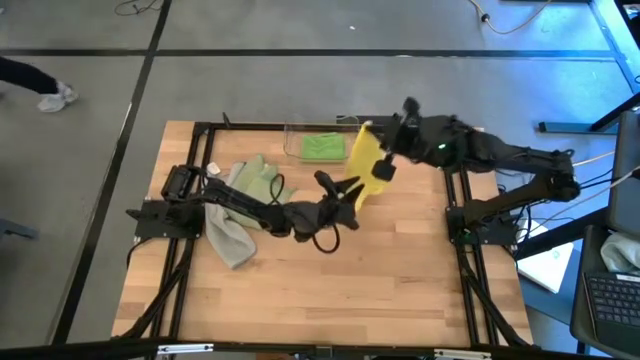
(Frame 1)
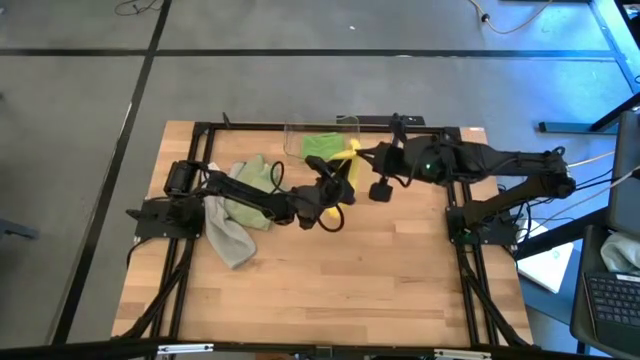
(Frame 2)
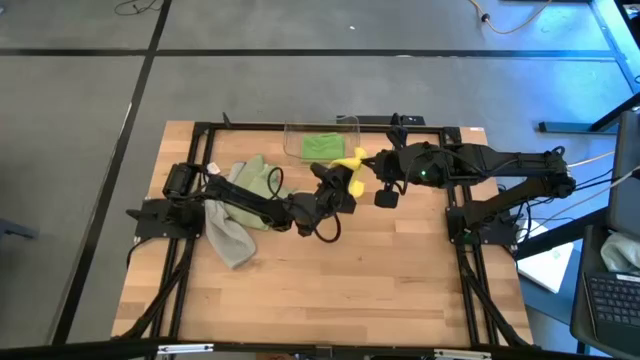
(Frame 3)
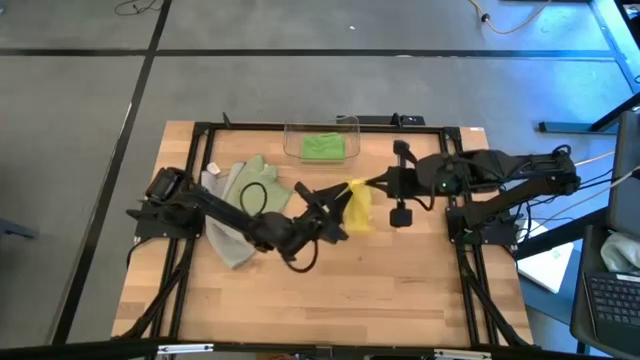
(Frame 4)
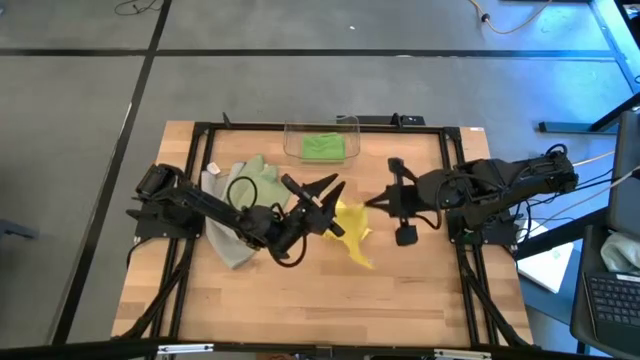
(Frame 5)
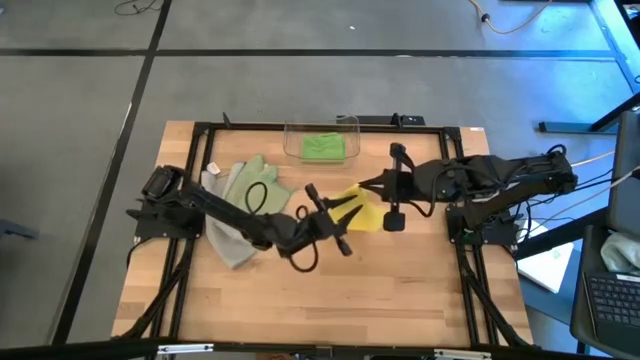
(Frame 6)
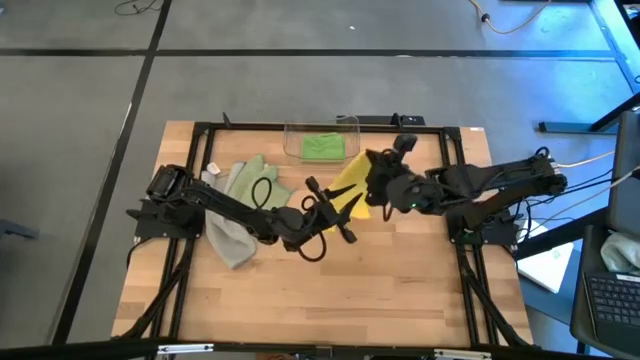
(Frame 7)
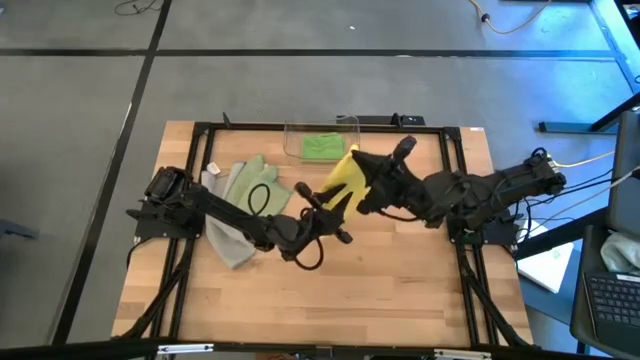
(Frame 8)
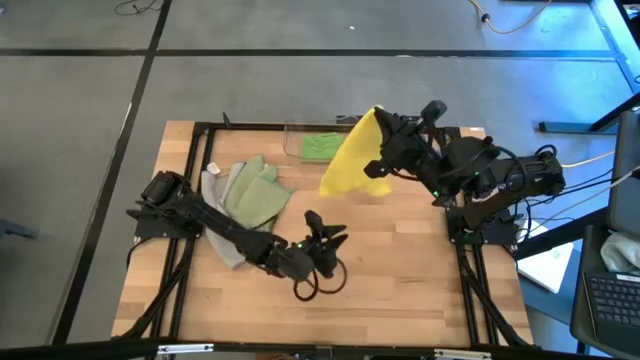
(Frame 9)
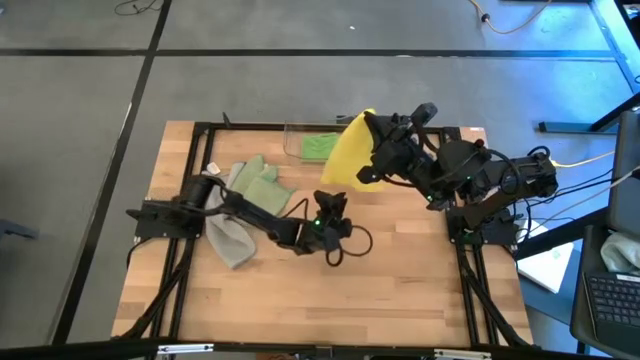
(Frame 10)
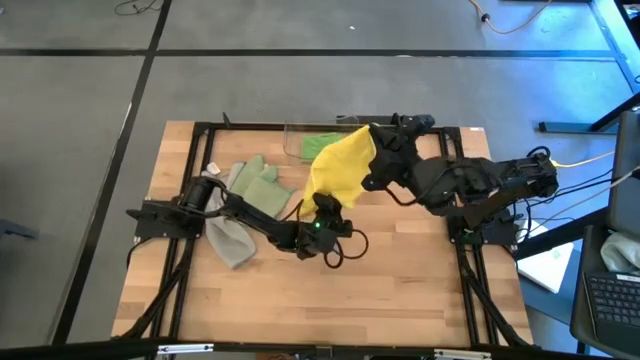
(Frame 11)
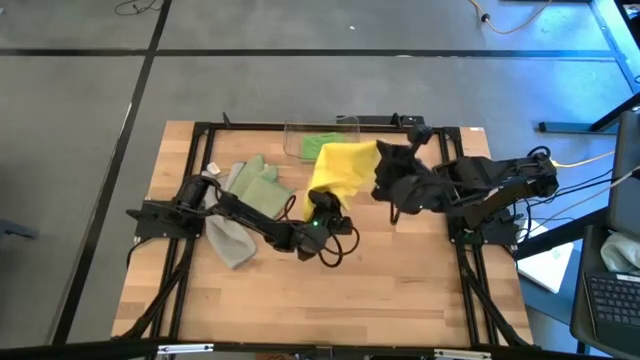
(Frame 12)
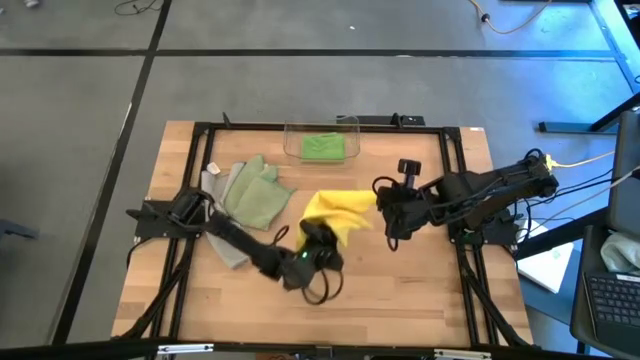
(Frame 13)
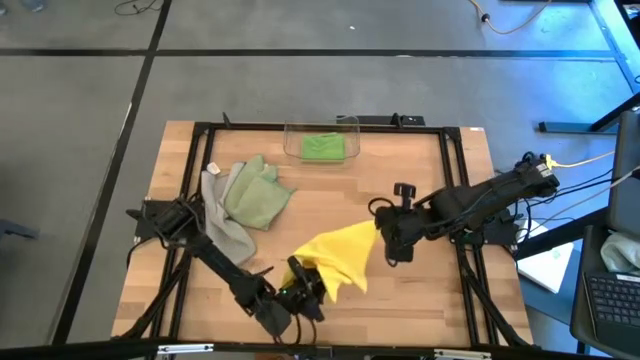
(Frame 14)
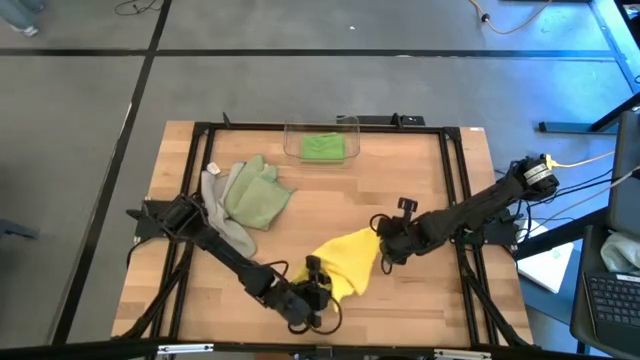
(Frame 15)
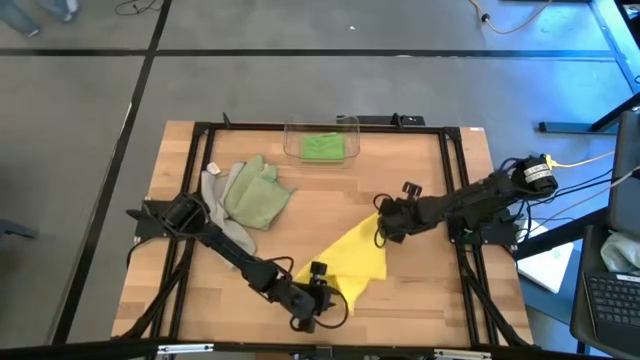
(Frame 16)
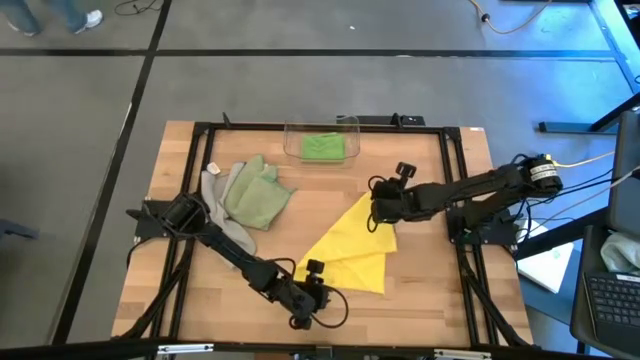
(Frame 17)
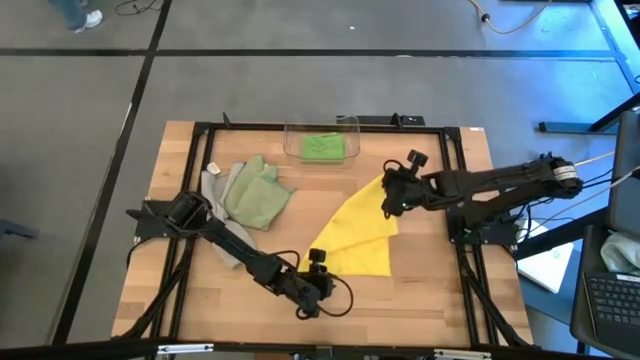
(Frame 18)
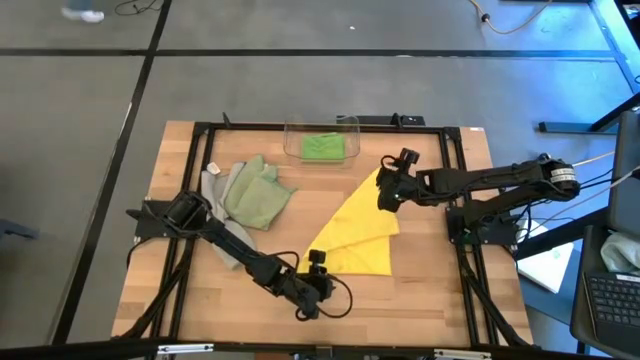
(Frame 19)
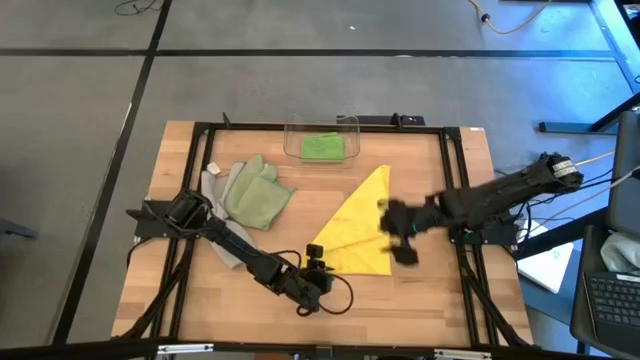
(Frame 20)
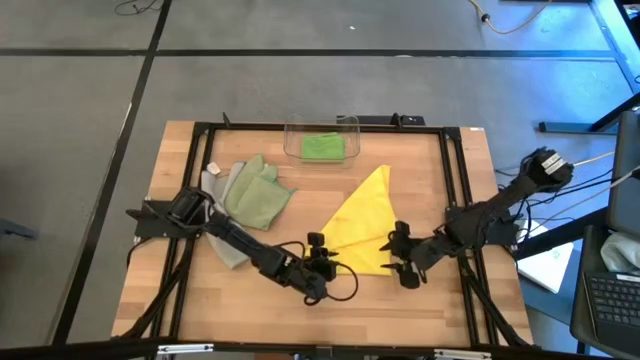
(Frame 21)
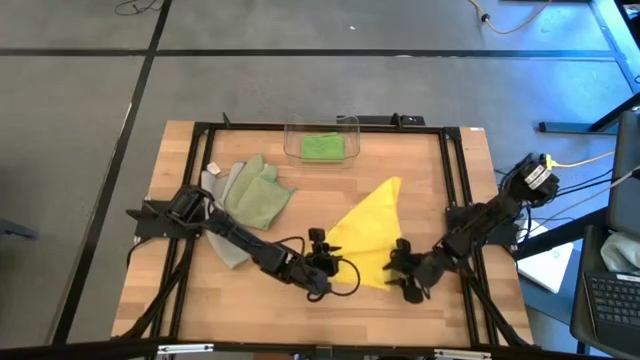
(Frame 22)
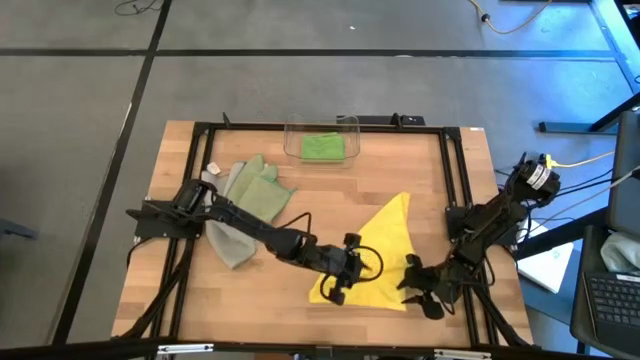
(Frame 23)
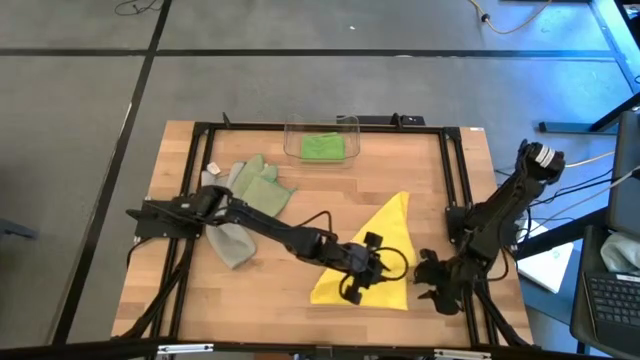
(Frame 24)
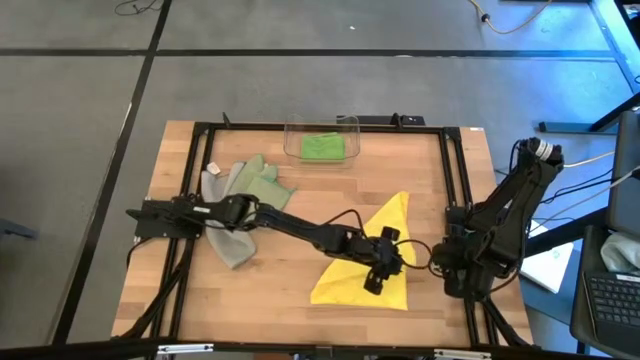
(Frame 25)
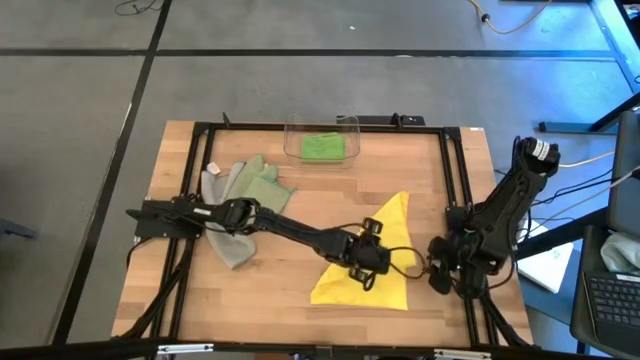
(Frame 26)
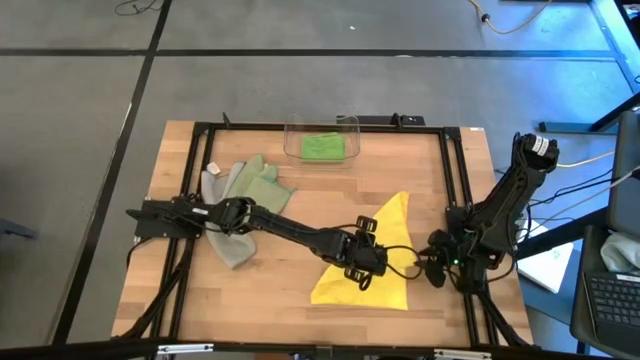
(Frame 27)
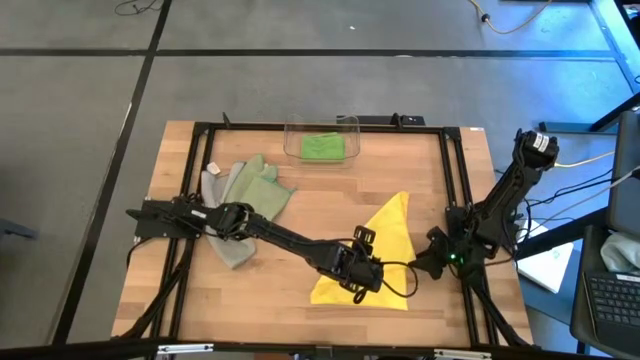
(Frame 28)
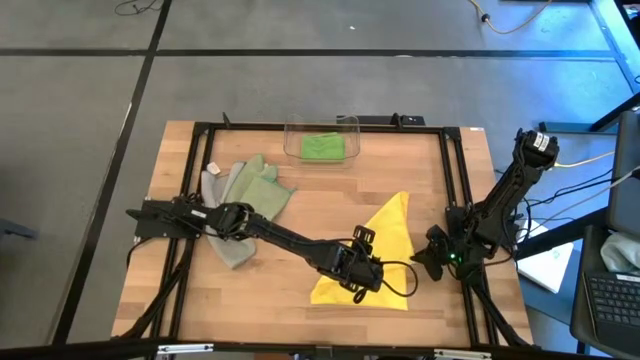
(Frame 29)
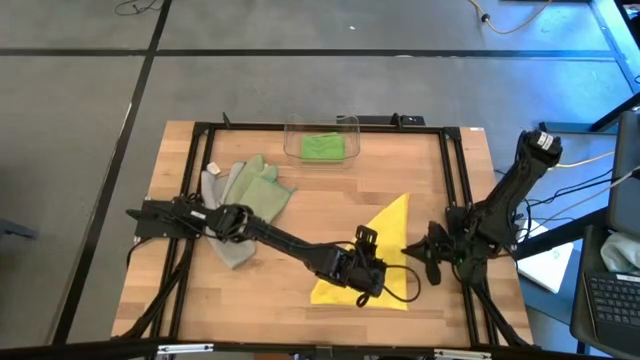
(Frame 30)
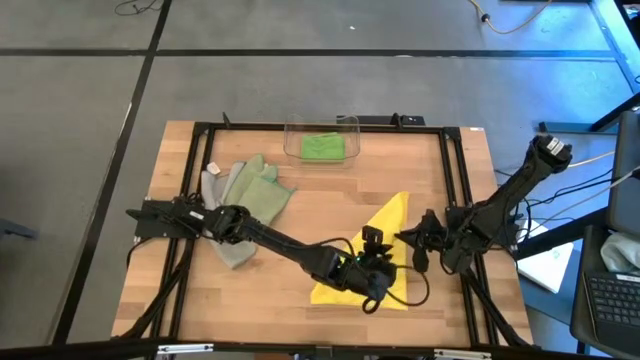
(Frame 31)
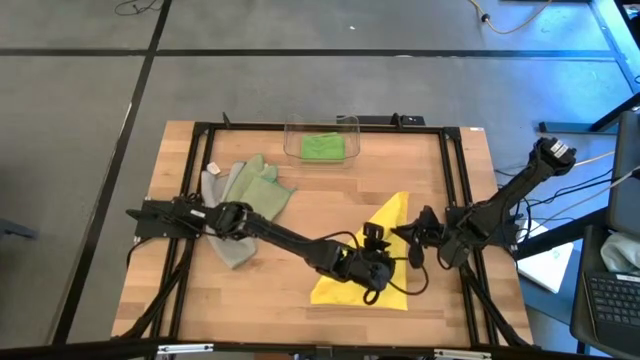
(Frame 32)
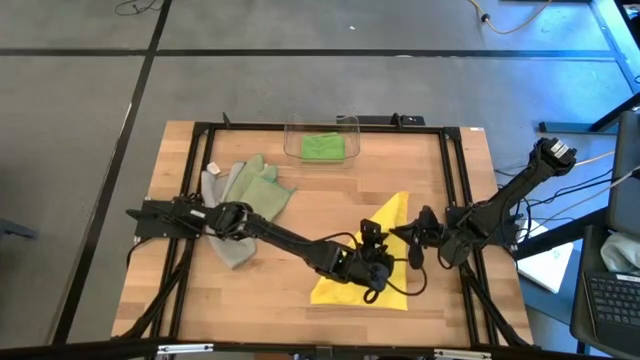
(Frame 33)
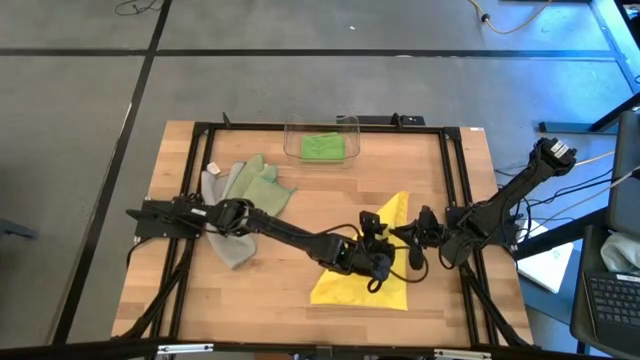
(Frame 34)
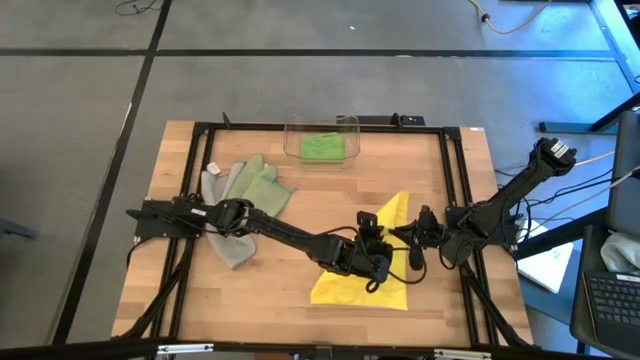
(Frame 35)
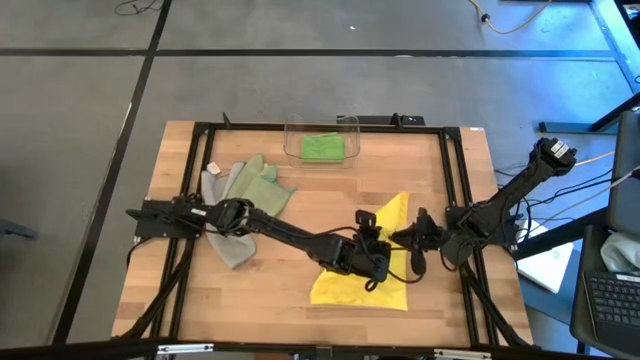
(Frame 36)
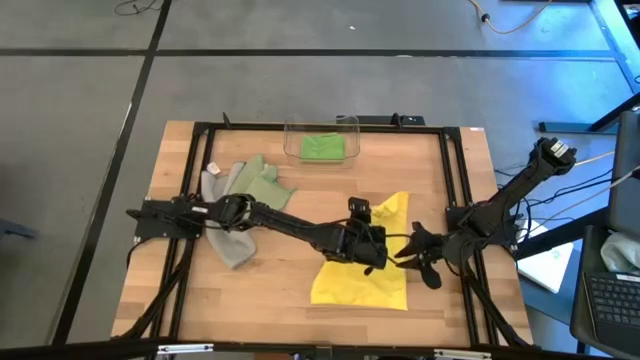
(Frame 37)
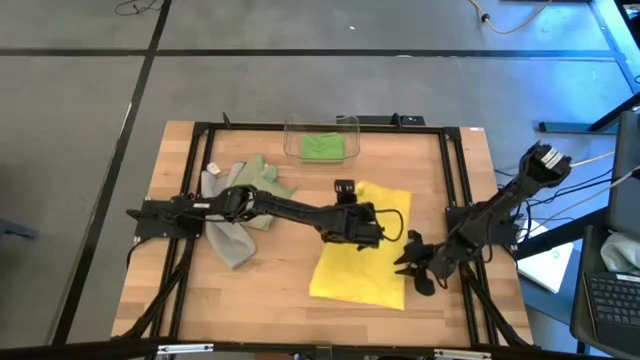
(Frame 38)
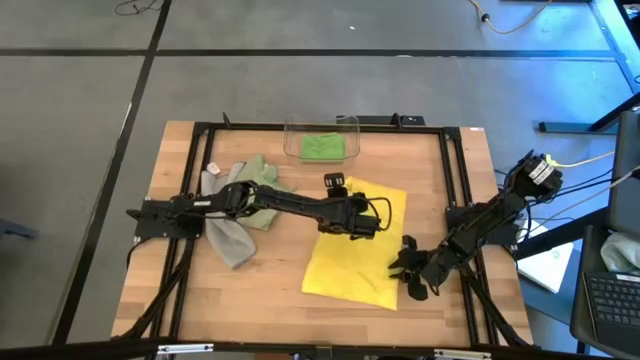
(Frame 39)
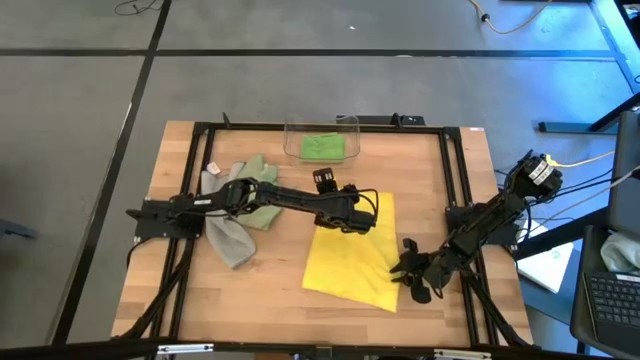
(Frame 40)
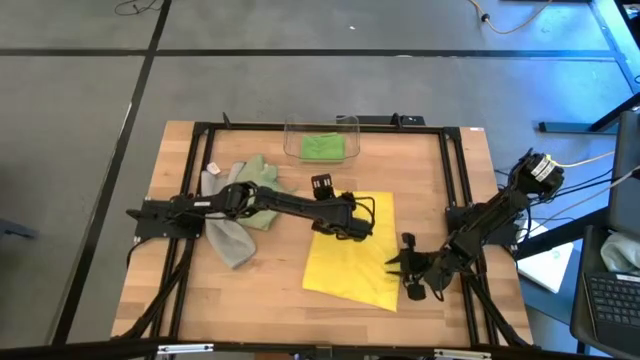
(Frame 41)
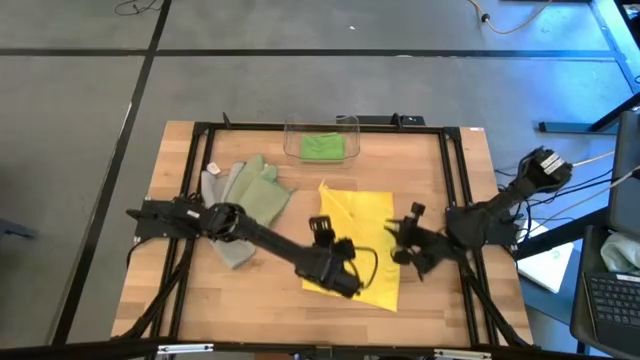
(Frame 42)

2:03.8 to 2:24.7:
Task: Fold microfiber towels
Fold the yellow microfiber cloth
